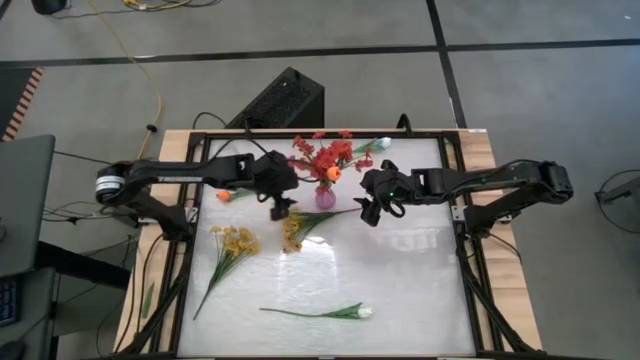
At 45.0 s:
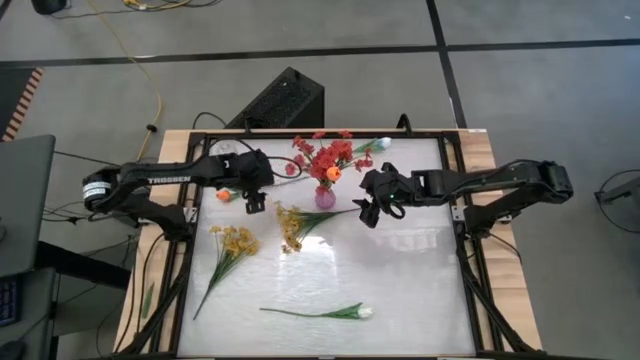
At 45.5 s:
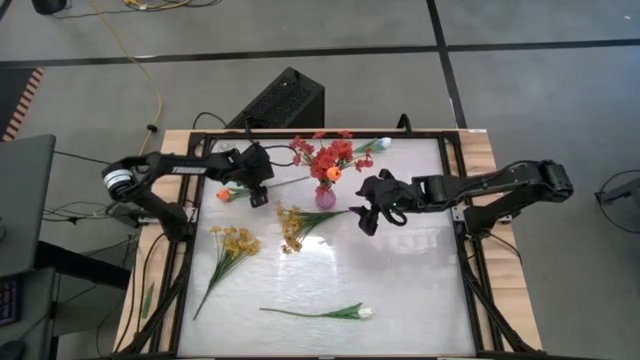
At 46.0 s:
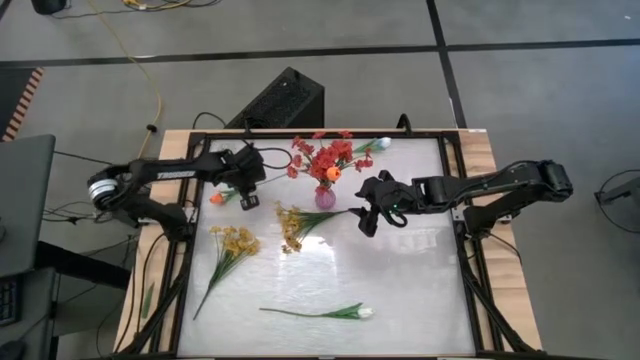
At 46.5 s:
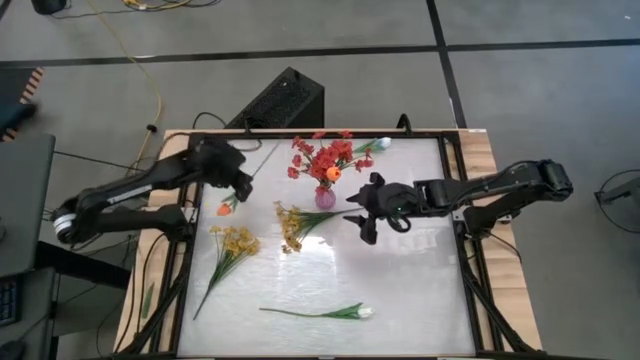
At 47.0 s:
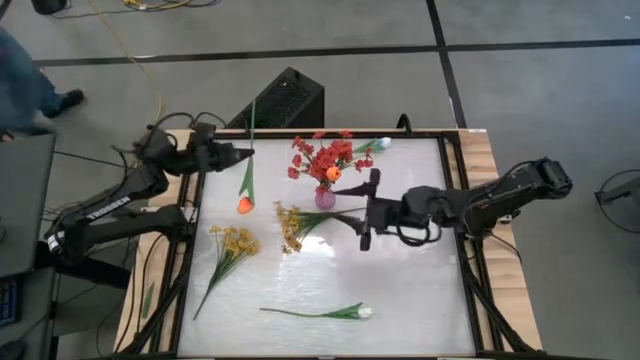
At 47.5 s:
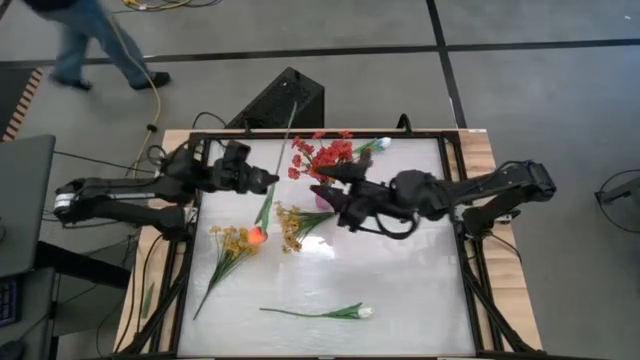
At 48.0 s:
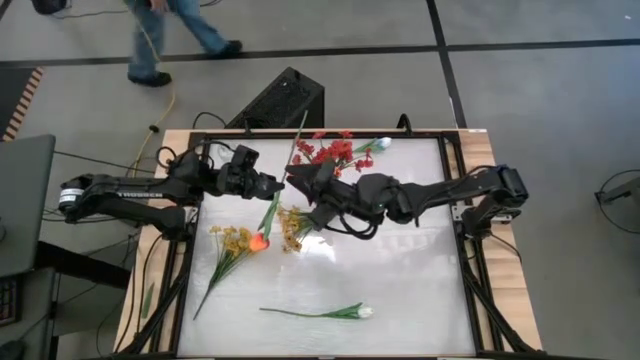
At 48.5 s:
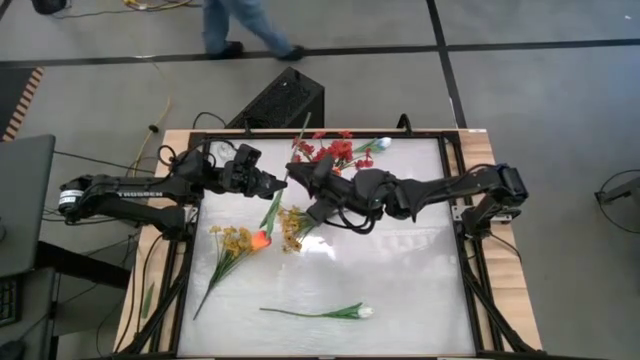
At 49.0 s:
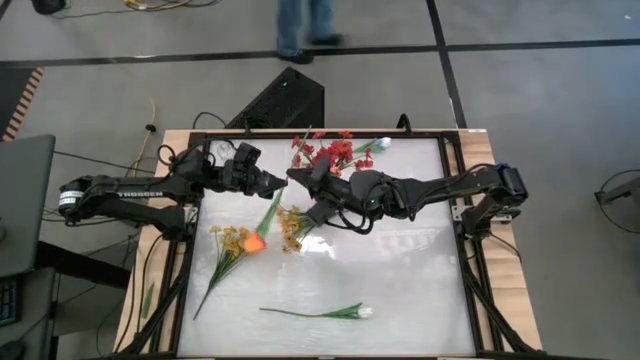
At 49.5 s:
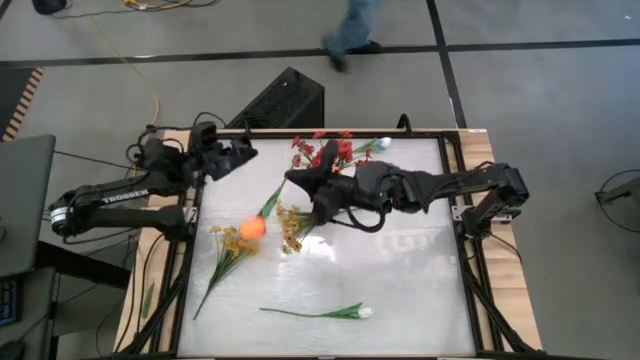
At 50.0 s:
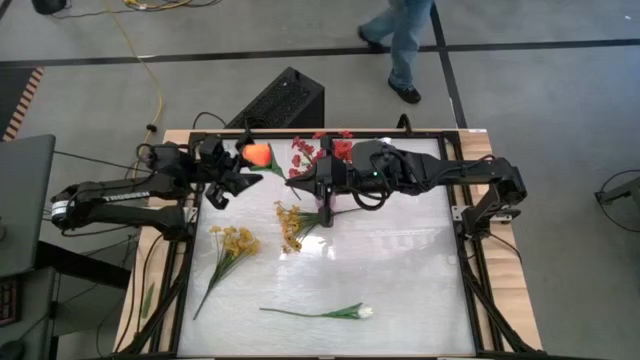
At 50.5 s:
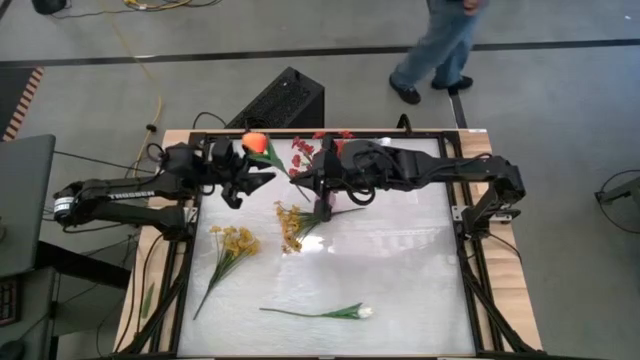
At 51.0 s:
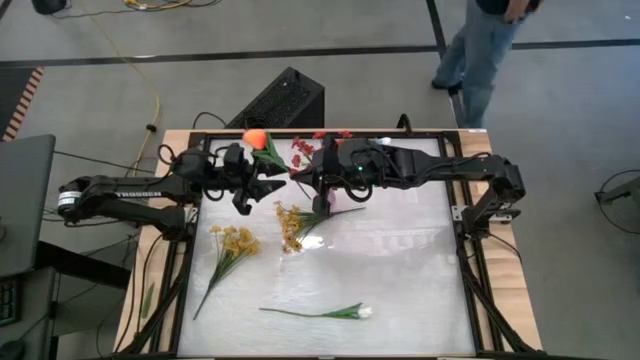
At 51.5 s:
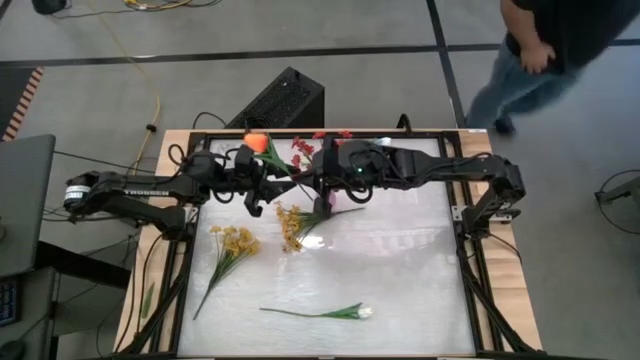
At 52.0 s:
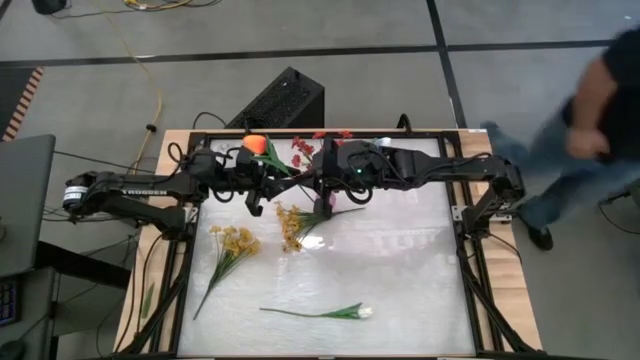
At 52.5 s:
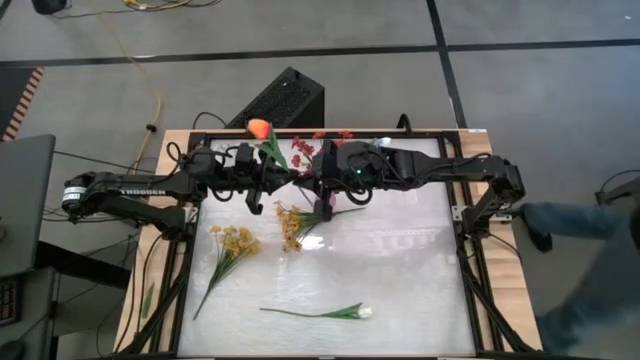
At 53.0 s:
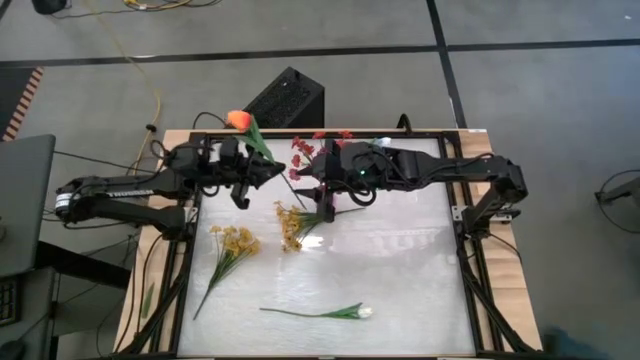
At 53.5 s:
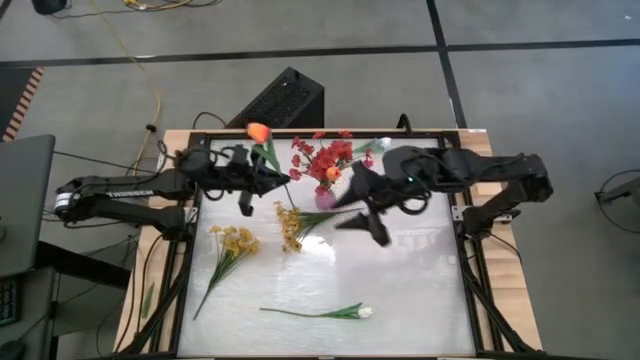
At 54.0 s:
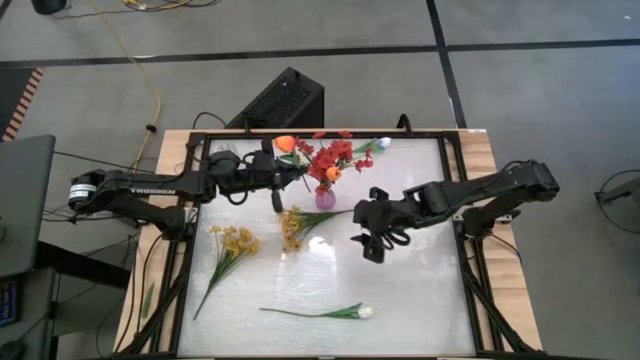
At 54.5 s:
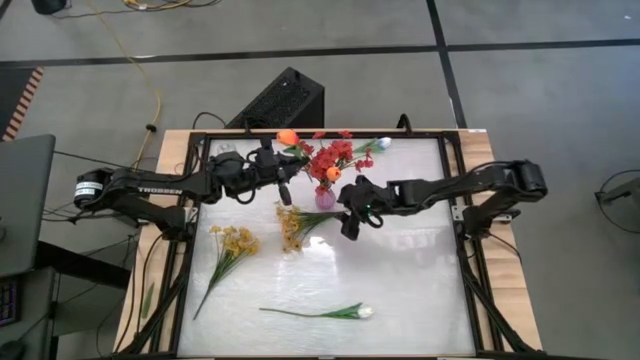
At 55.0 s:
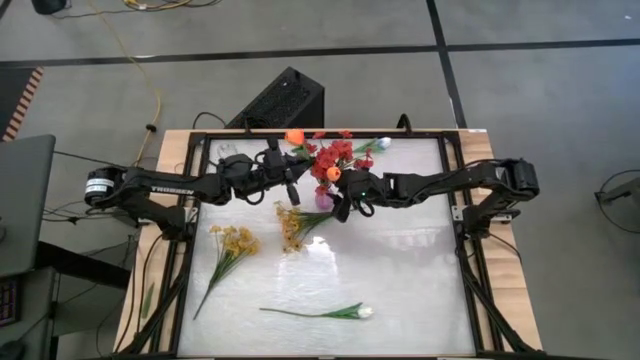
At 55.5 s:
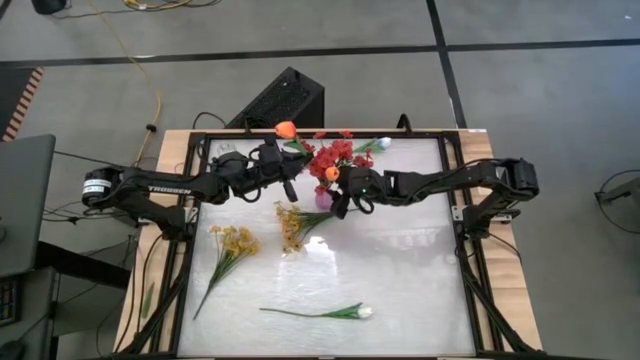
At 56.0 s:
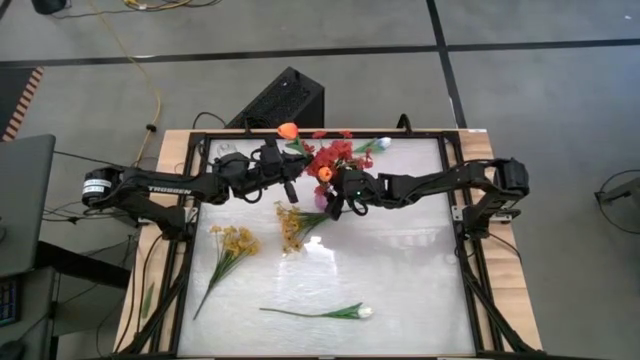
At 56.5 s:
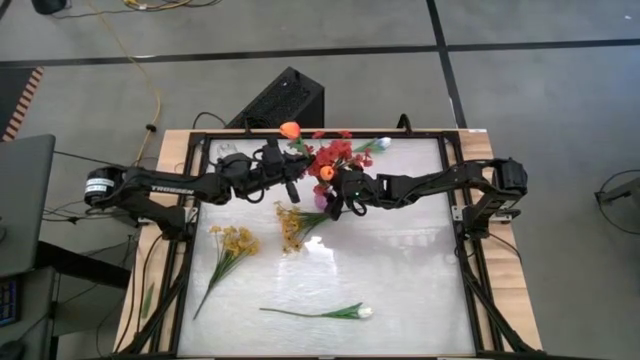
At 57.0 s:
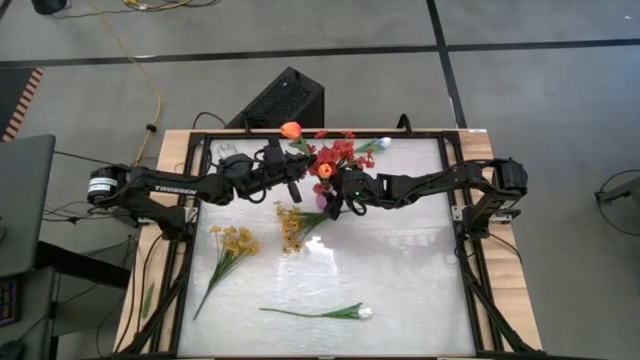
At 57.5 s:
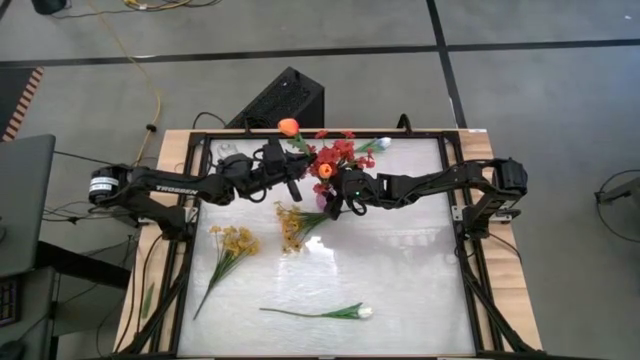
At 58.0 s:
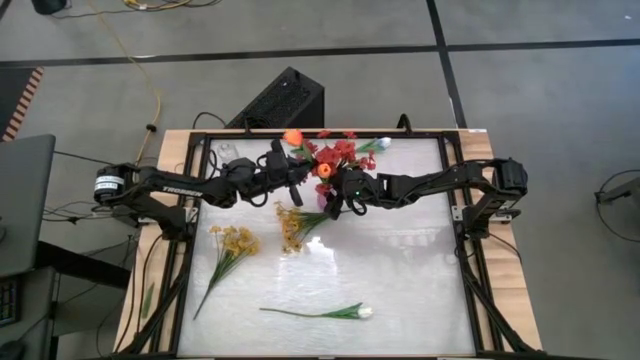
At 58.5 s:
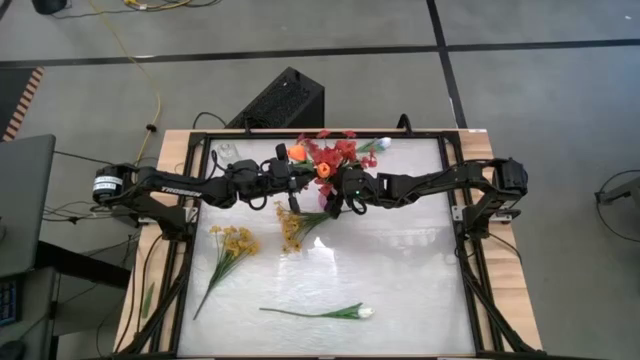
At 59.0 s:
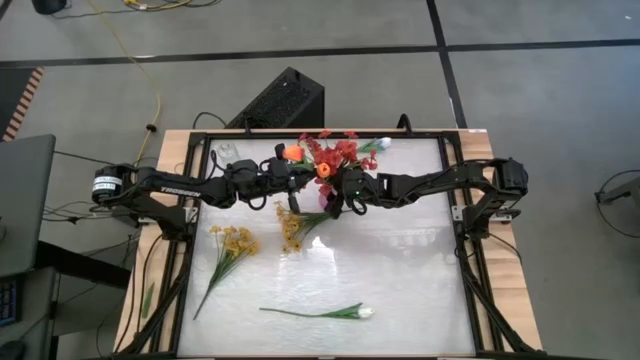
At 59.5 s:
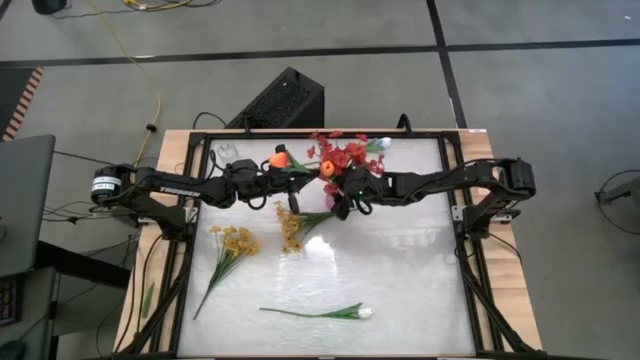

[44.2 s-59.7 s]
Task: Sort flowers into vase by color
Put the orange tulip into the violet vase

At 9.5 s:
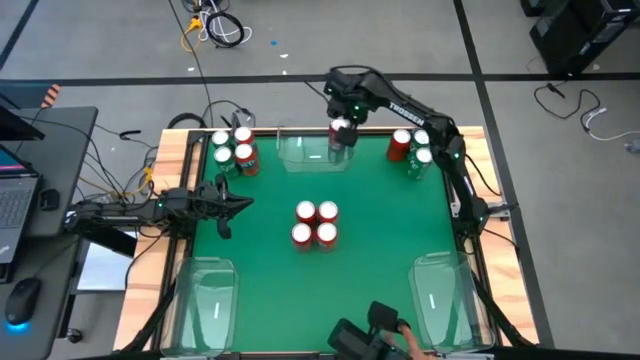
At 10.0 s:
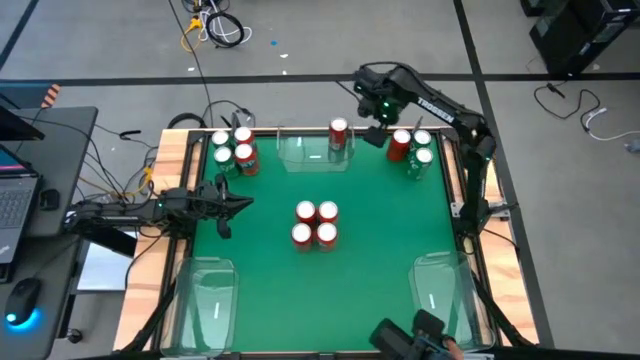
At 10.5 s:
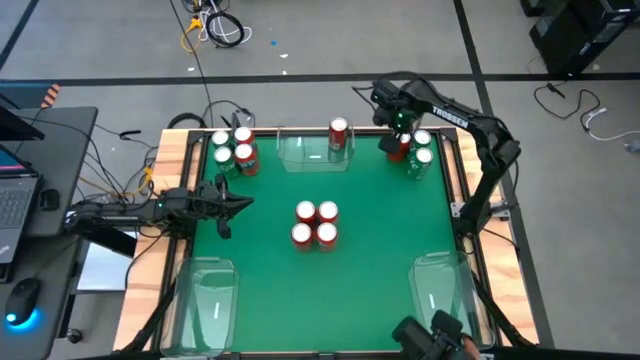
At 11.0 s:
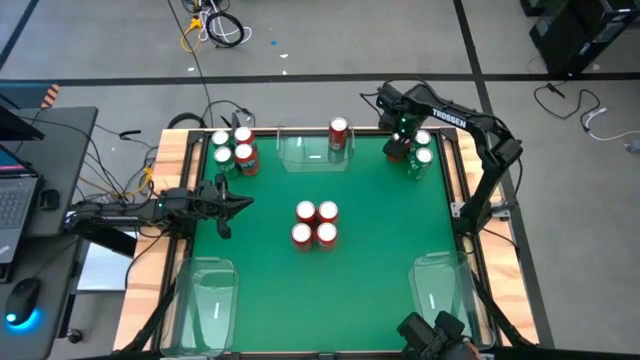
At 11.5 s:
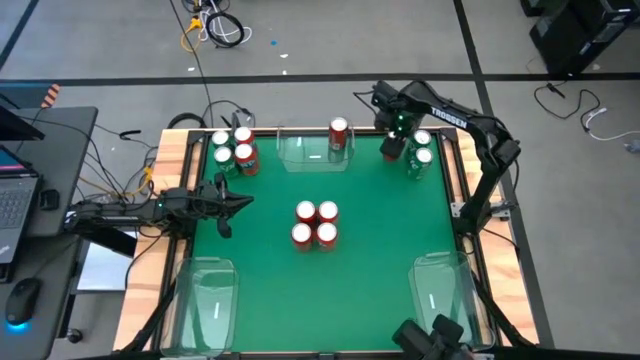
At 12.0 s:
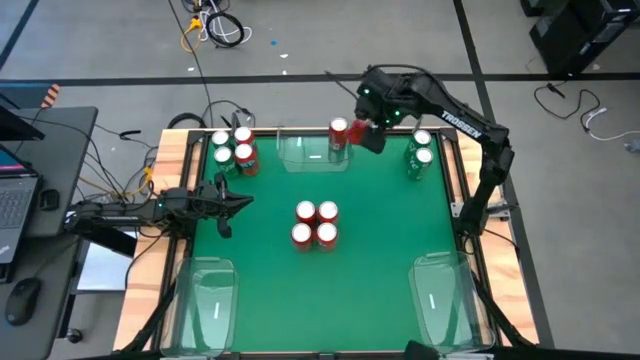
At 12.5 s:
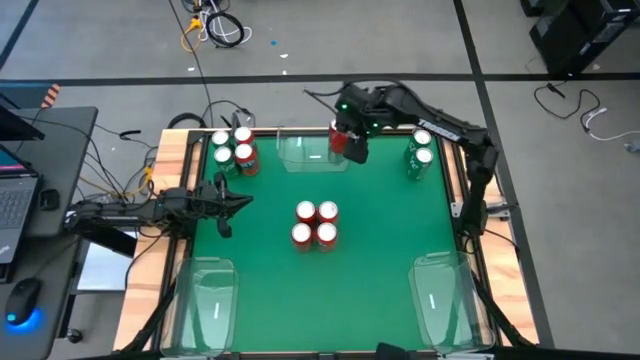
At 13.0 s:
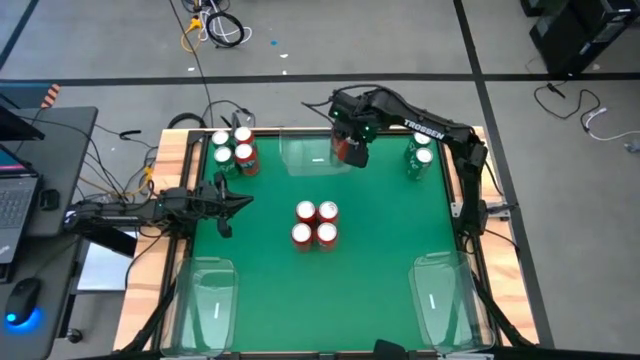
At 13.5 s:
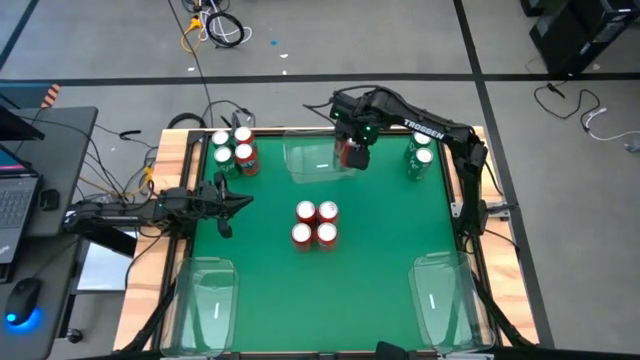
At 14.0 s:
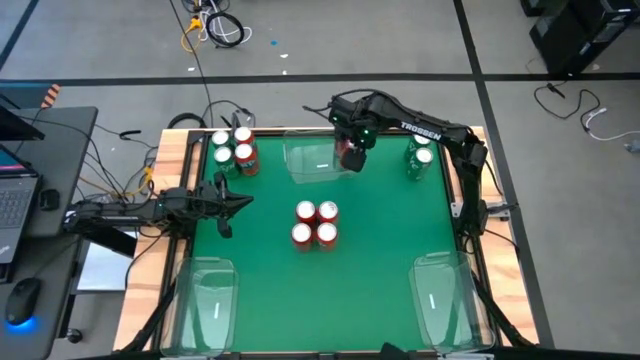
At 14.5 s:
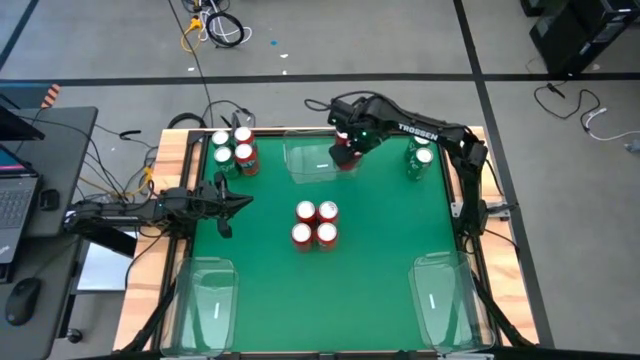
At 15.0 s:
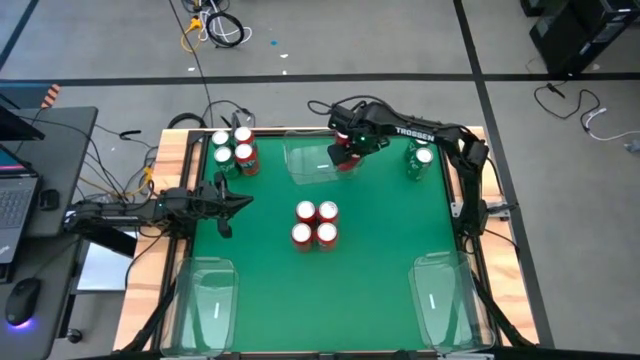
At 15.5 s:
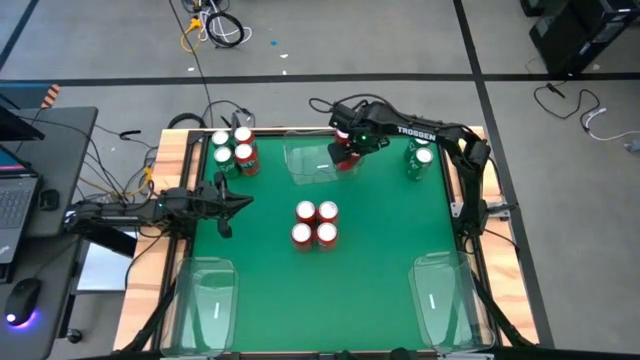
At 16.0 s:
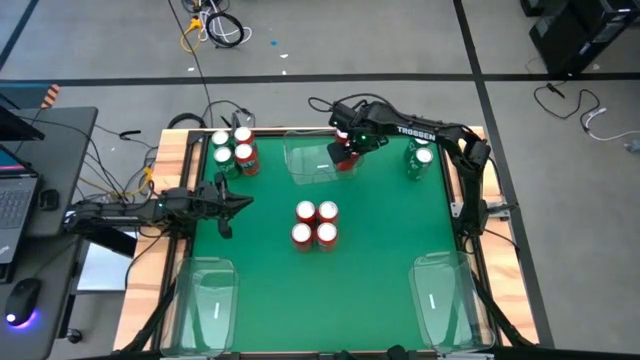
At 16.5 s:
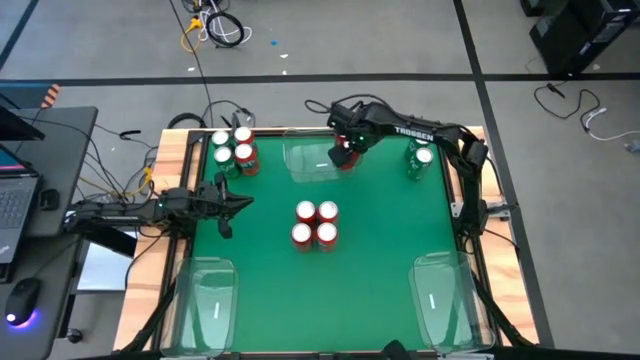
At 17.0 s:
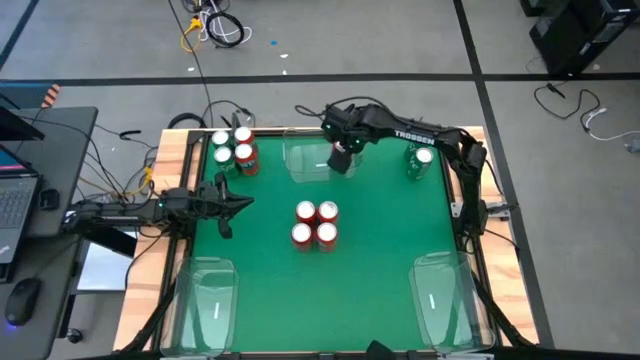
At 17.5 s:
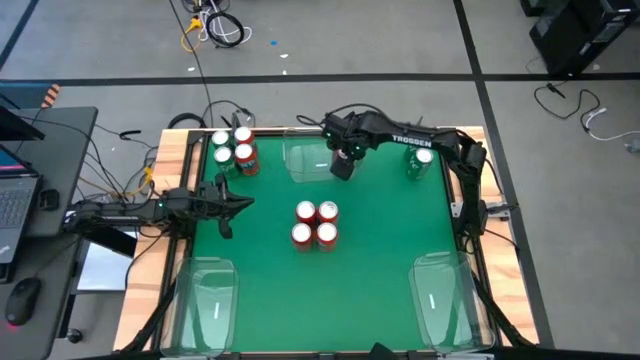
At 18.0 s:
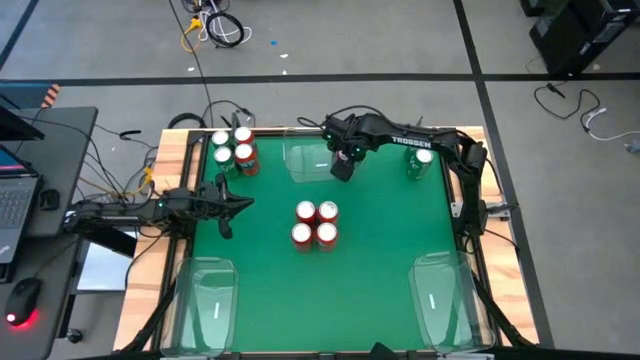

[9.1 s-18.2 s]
Task: Sort soda cans
Put the red-black soda can into the top transparent bin
